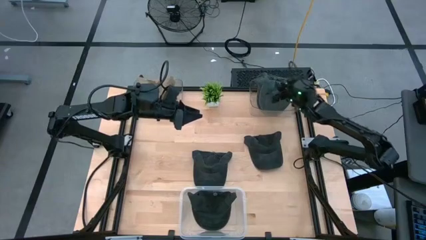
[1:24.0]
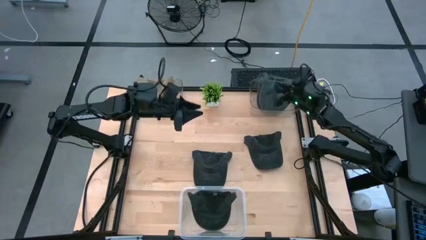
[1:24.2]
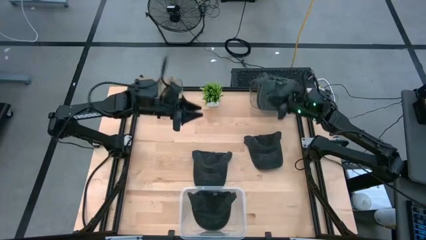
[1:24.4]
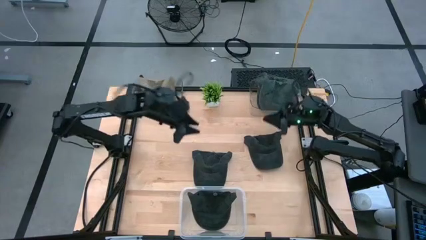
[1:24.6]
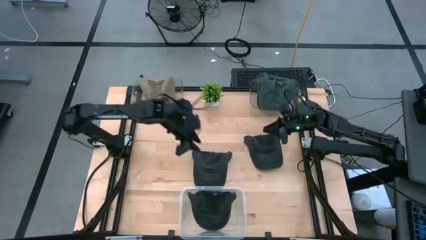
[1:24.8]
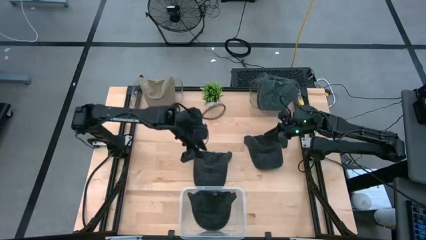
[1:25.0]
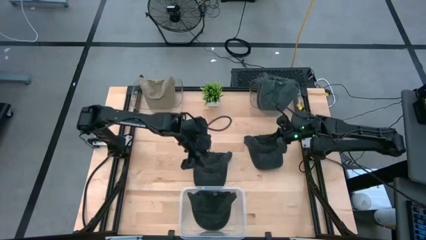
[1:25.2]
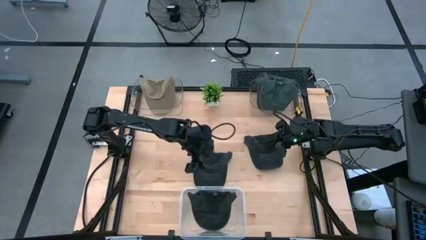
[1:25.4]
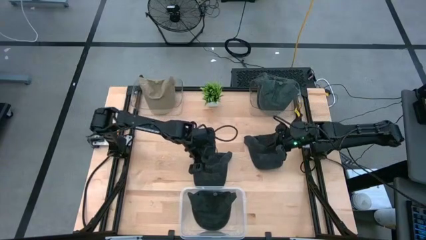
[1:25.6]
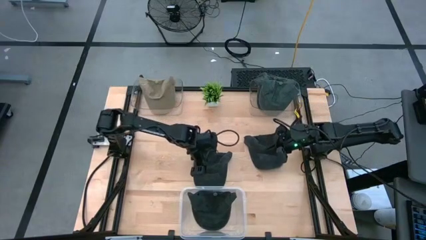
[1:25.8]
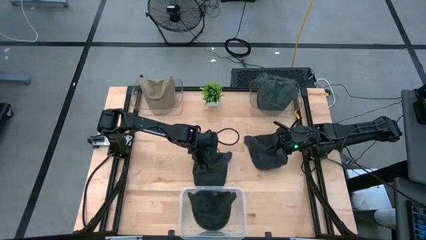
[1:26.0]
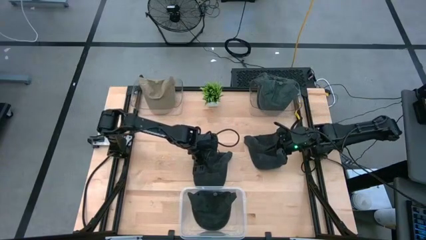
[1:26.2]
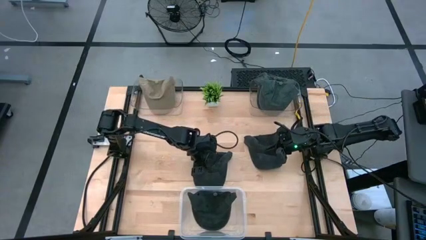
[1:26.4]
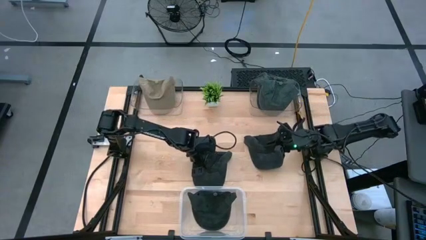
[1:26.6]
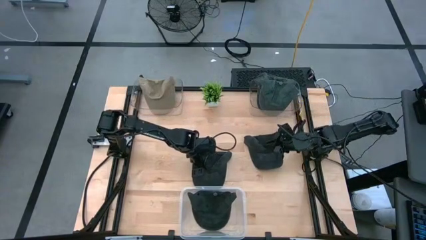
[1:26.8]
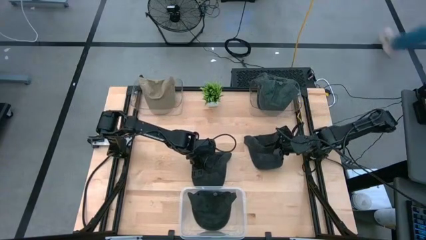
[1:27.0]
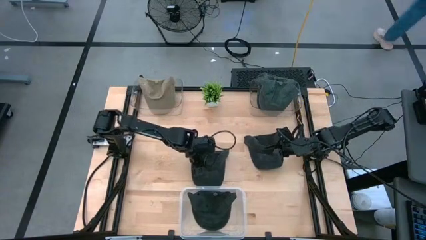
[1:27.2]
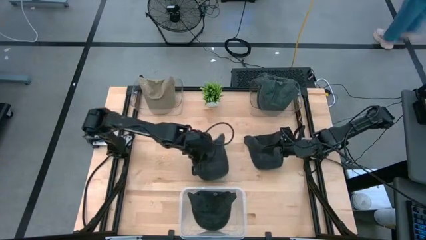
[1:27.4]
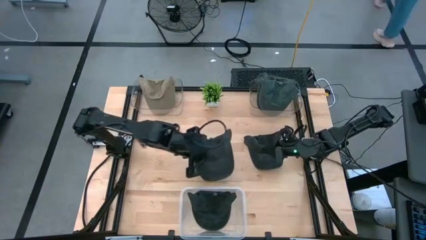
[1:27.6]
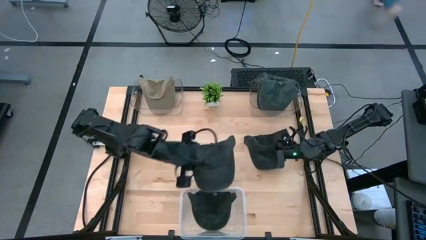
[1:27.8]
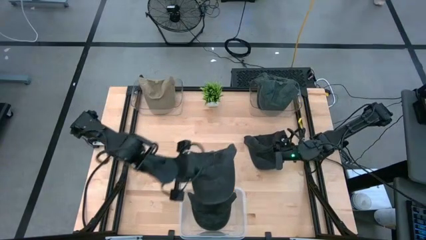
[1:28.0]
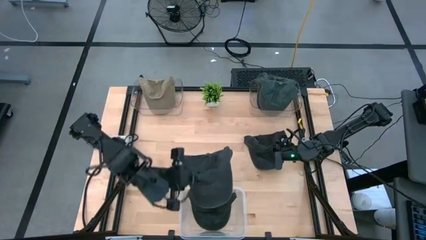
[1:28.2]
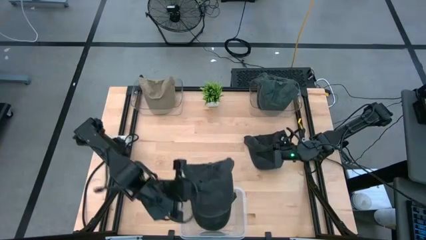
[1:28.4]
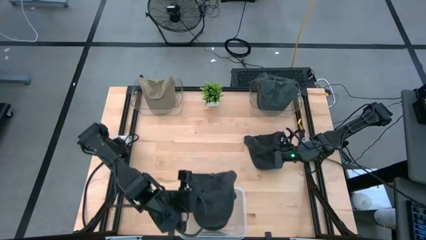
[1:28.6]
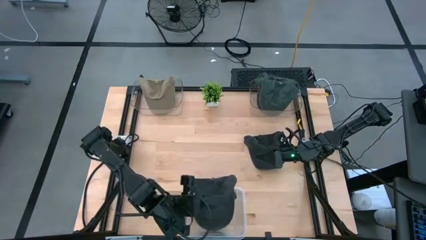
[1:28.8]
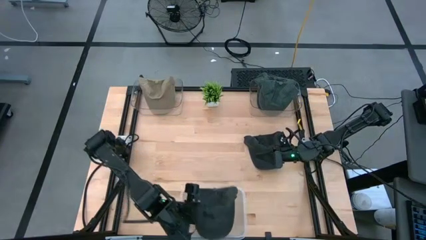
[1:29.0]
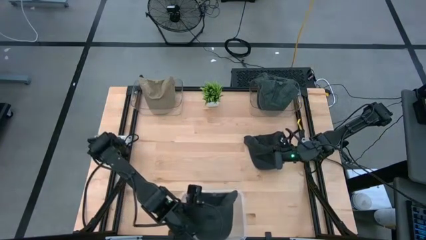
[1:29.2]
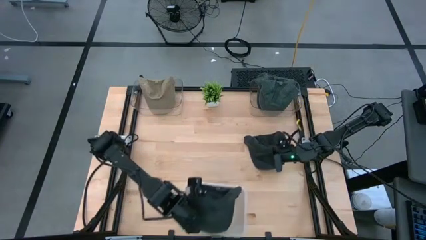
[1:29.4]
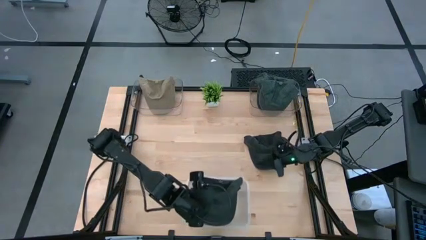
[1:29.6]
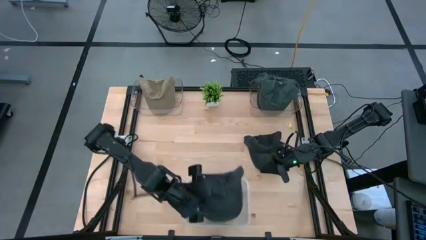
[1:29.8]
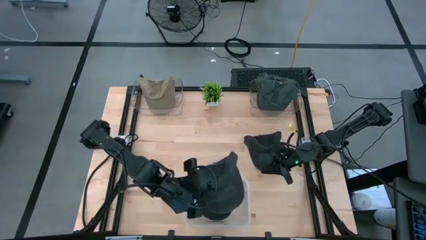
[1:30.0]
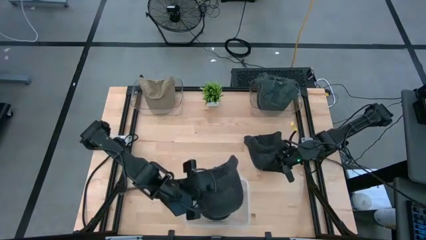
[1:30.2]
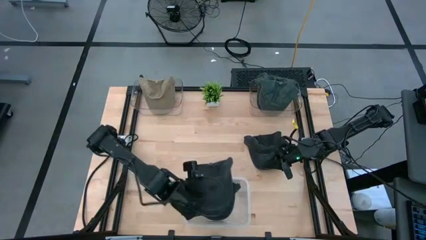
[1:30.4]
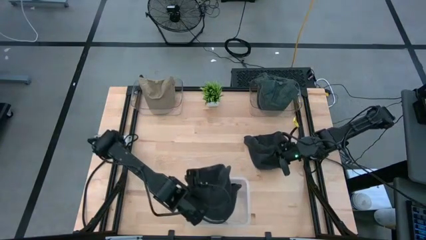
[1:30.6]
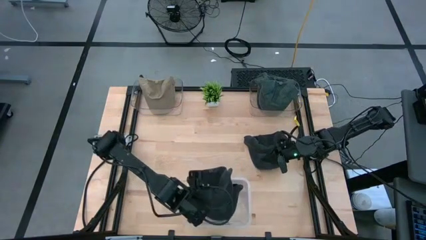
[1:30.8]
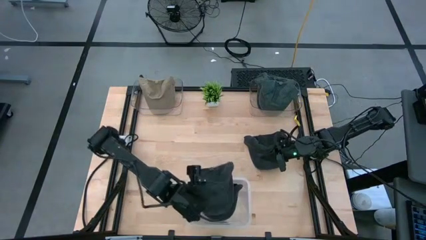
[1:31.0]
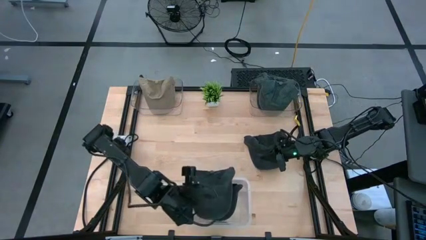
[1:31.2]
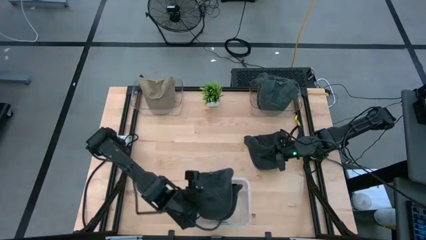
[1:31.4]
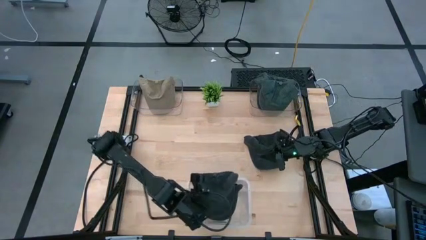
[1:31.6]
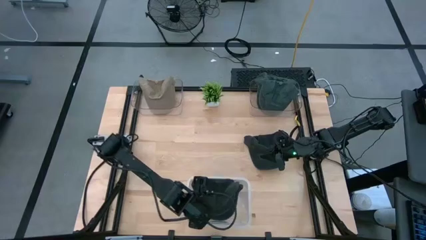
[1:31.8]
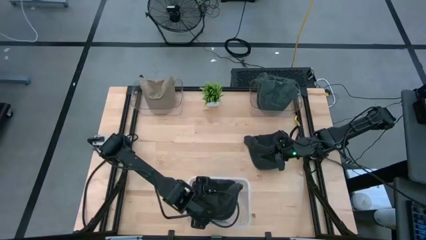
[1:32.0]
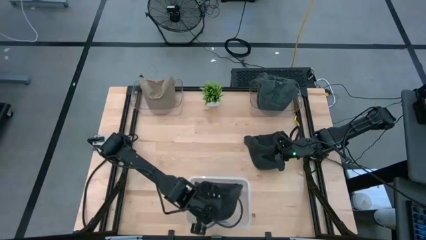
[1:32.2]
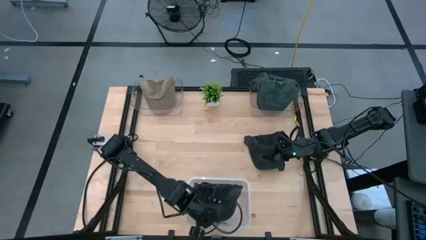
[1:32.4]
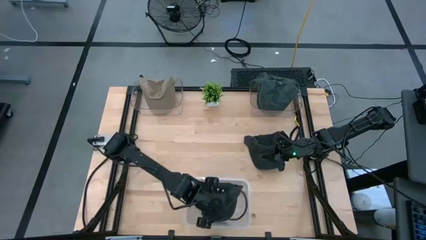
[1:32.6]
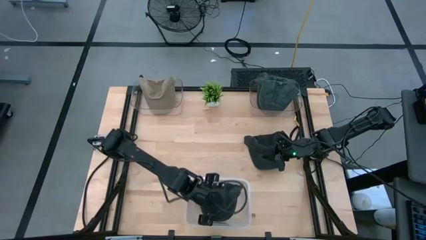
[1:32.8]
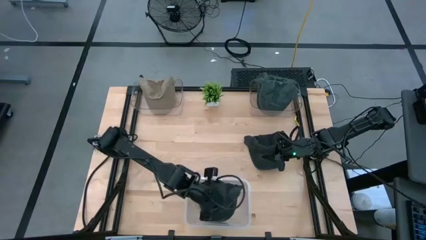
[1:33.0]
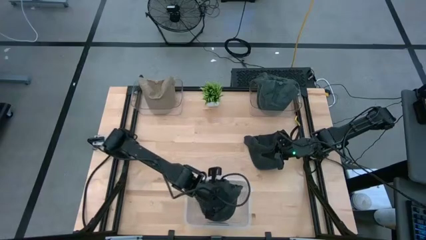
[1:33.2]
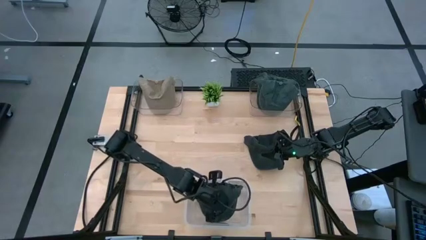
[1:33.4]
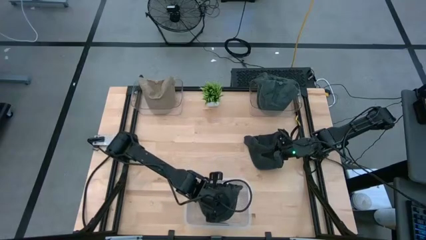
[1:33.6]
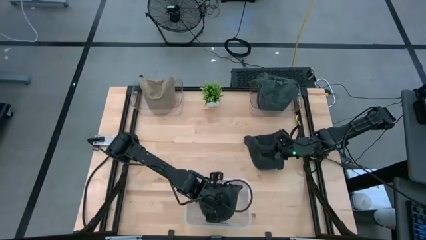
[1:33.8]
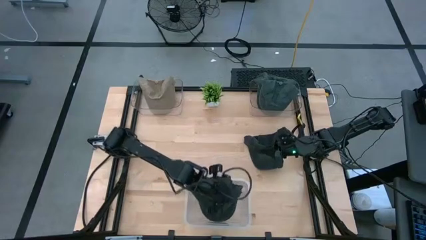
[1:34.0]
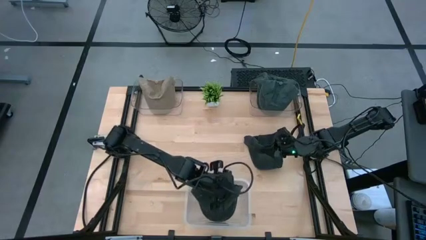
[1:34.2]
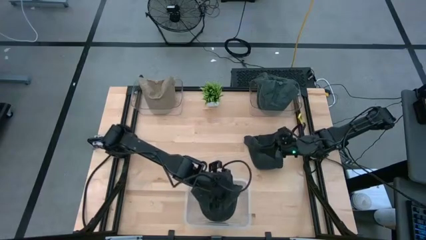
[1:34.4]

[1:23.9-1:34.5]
Task: Pick & Place hat
Put the left black cap into the white transparent bin

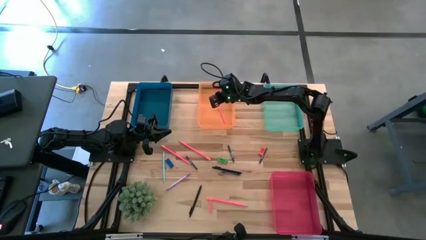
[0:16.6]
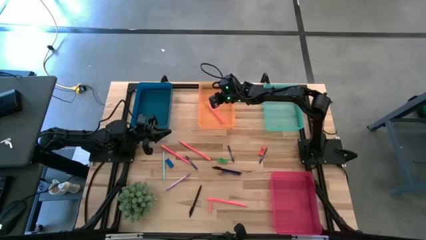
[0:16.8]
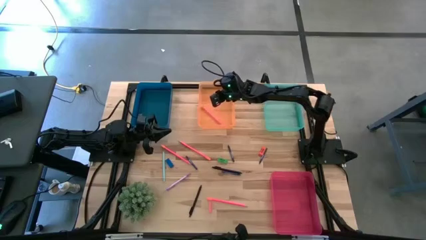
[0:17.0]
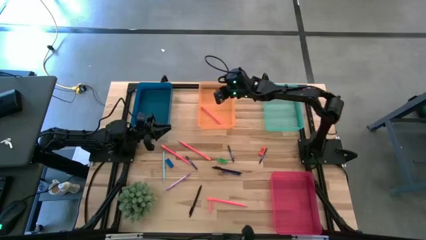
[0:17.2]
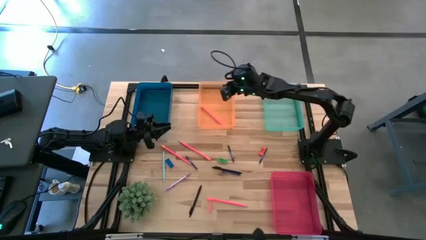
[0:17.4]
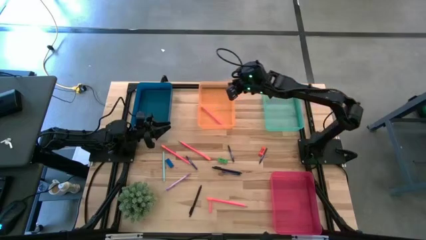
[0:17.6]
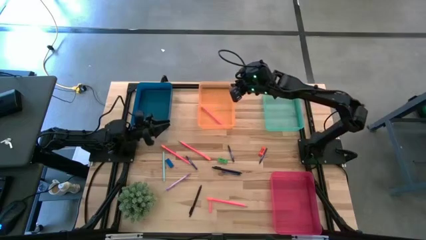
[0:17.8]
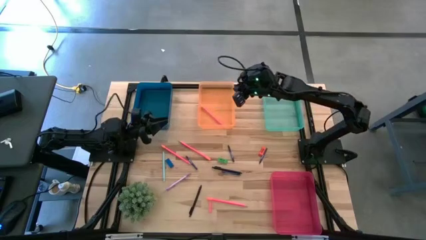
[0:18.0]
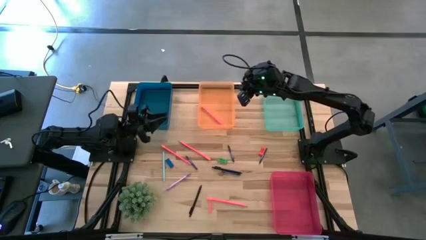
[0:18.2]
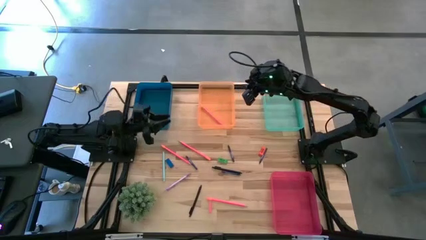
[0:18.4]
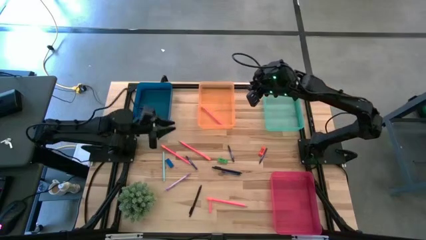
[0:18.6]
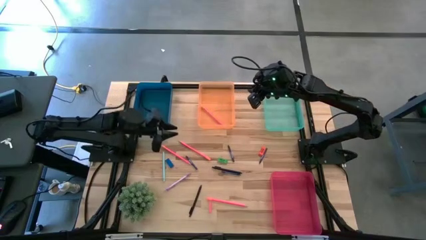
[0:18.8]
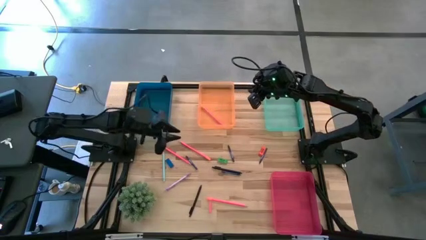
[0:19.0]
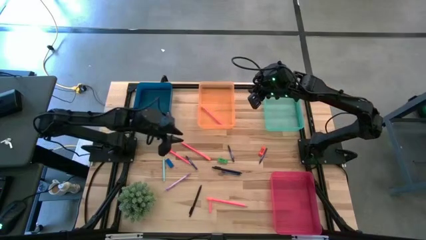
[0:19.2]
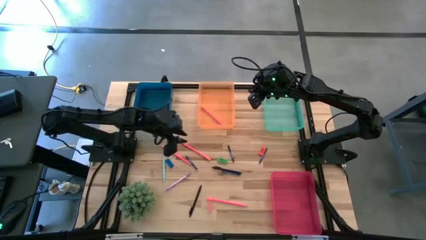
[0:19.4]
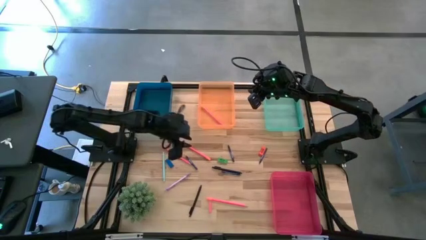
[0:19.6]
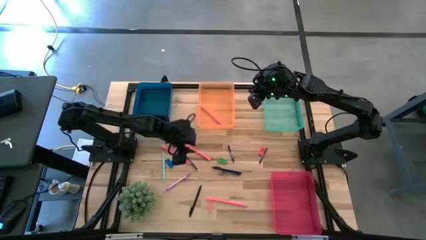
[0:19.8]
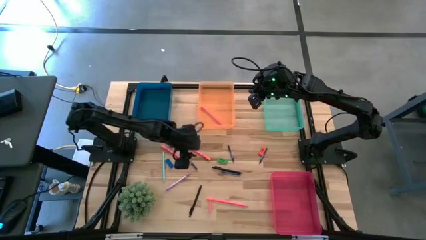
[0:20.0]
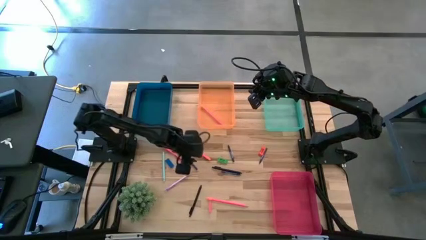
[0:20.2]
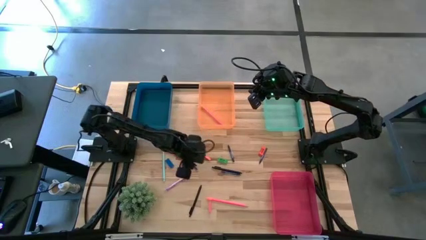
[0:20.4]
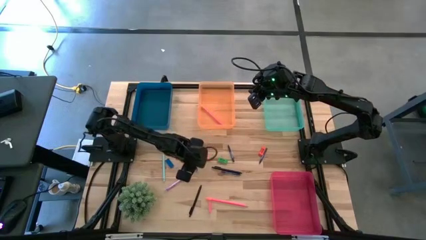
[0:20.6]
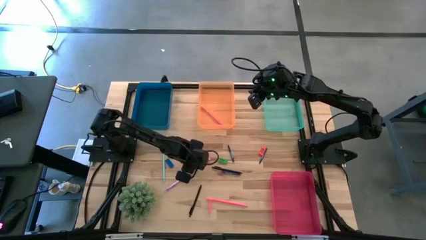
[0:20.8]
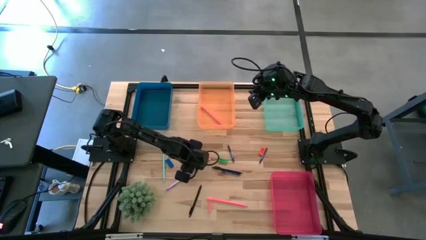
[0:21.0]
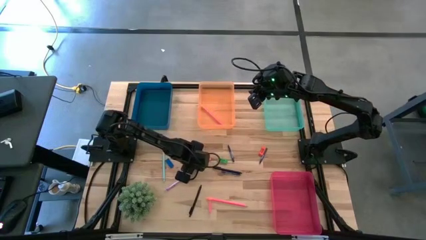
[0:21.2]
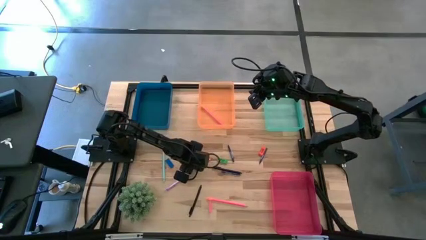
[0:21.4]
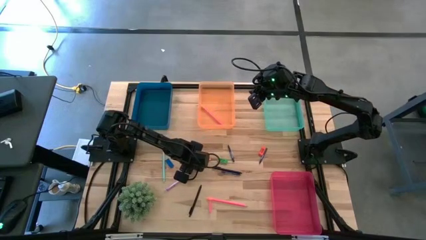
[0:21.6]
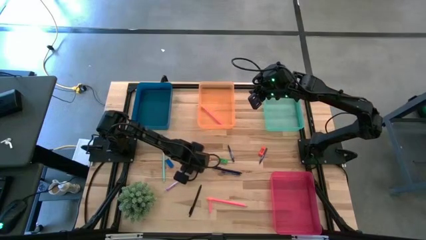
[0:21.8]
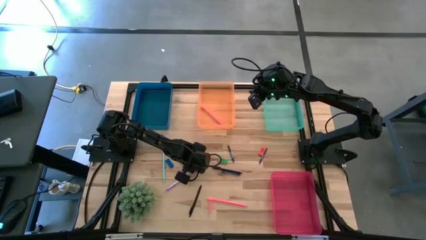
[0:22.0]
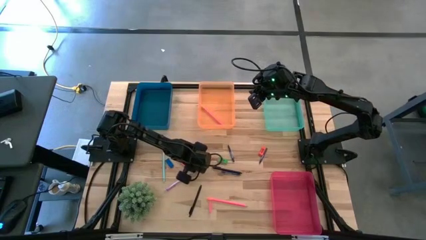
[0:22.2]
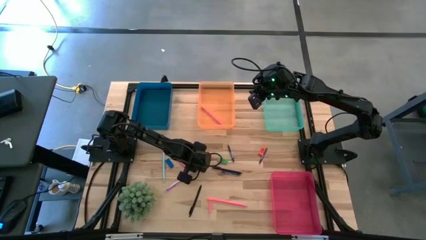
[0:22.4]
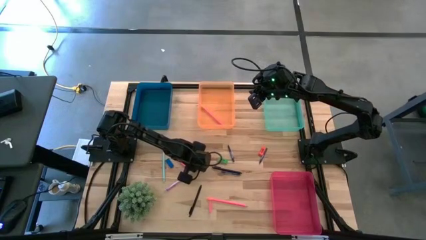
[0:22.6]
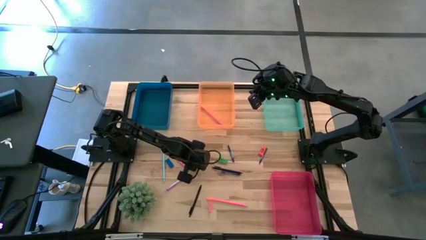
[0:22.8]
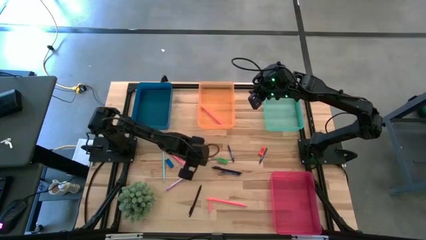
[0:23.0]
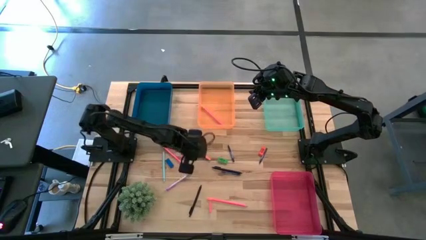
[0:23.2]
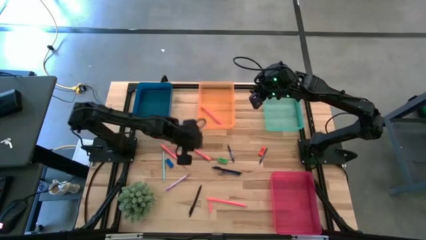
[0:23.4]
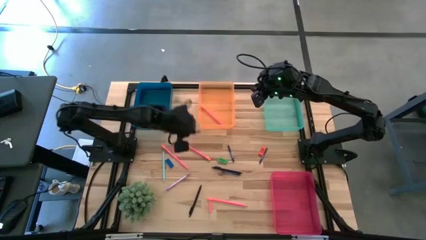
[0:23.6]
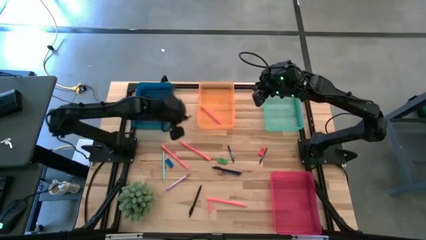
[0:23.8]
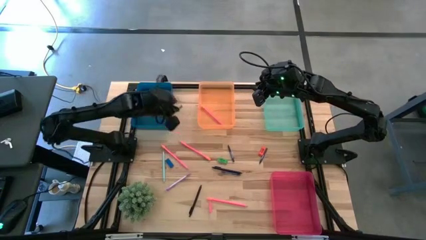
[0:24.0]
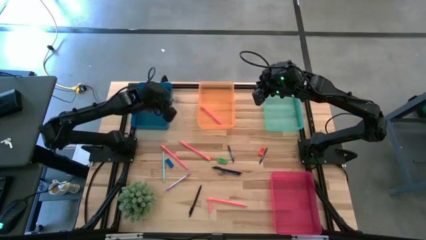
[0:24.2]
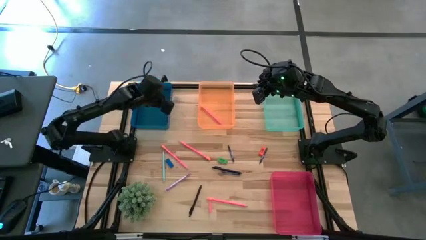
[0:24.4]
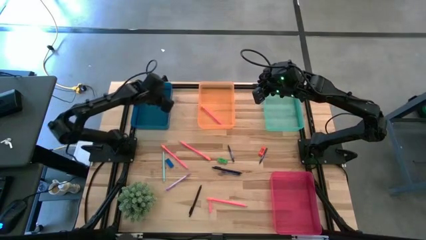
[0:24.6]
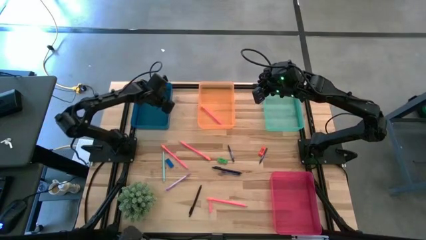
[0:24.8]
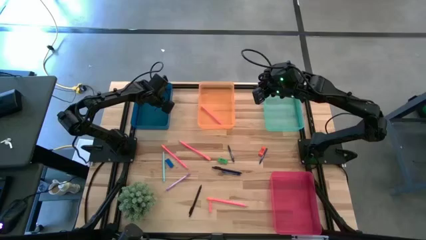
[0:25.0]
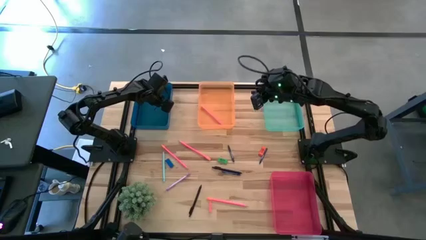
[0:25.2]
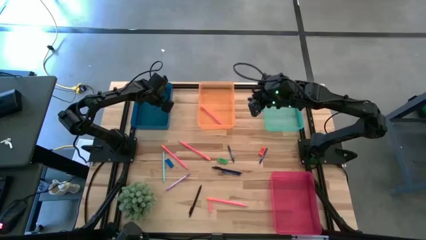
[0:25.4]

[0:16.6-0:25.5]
Task: Sort crayons/erasers/pens/pencils in bins
Put the blue crayon into the blue bin
